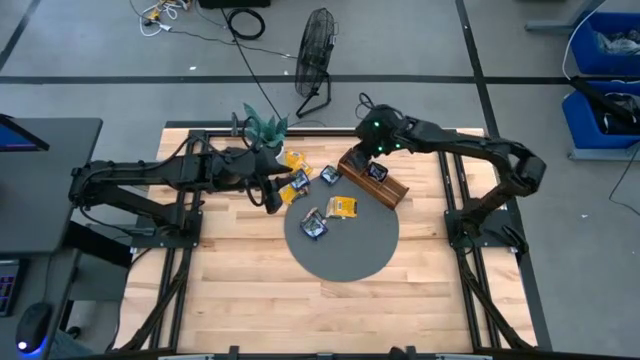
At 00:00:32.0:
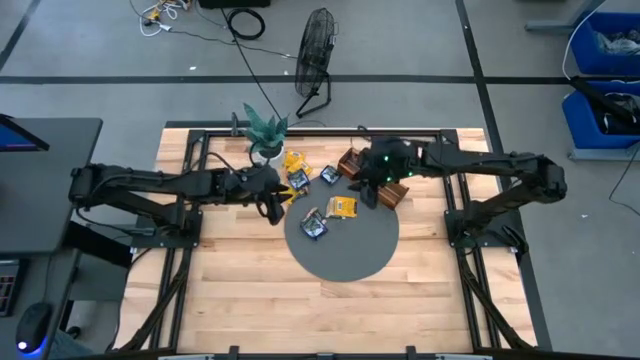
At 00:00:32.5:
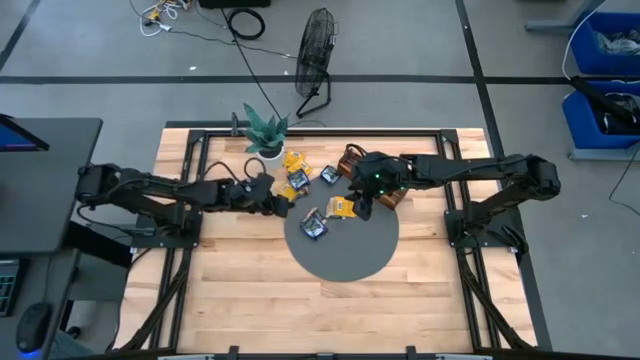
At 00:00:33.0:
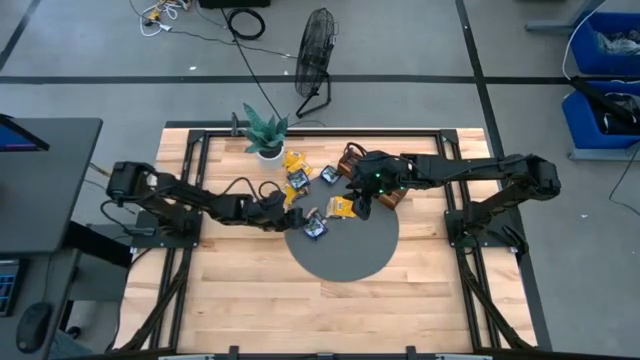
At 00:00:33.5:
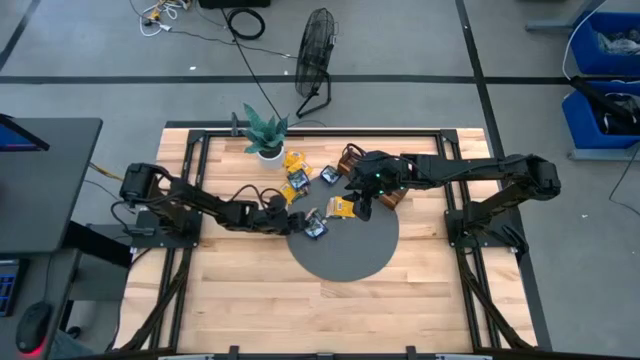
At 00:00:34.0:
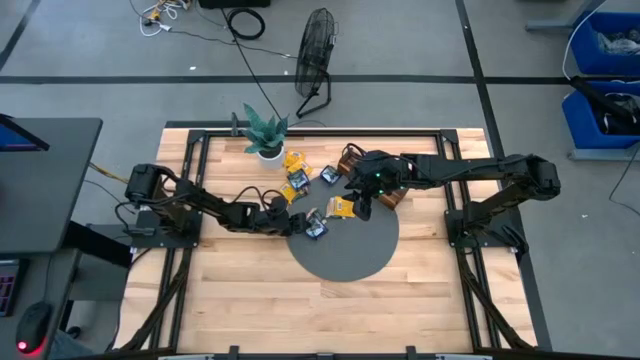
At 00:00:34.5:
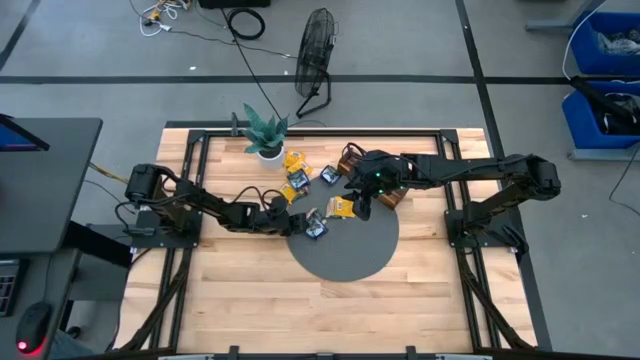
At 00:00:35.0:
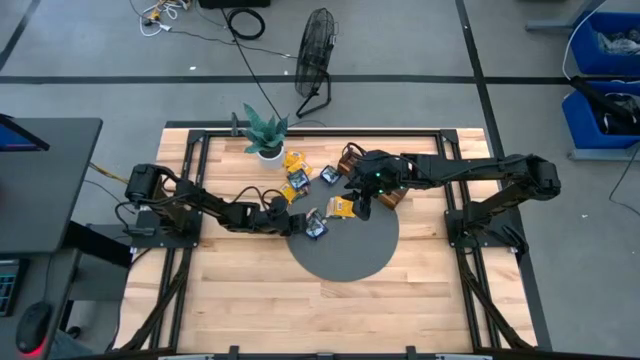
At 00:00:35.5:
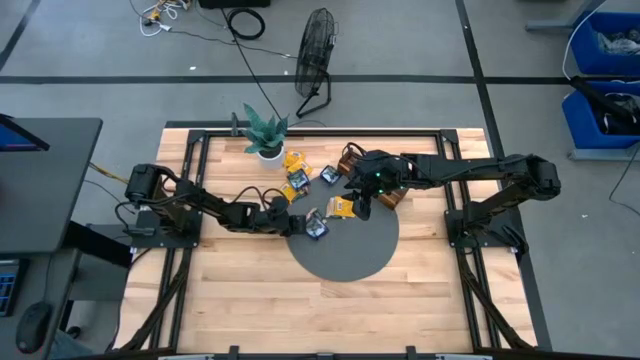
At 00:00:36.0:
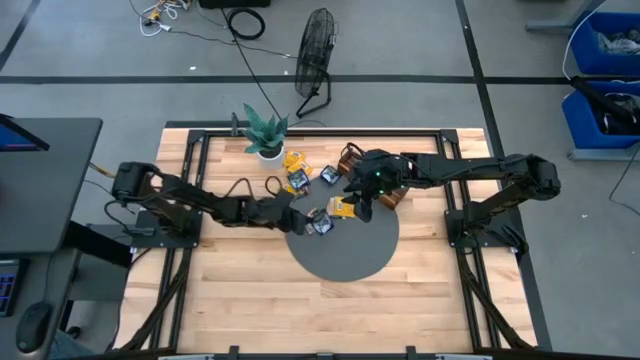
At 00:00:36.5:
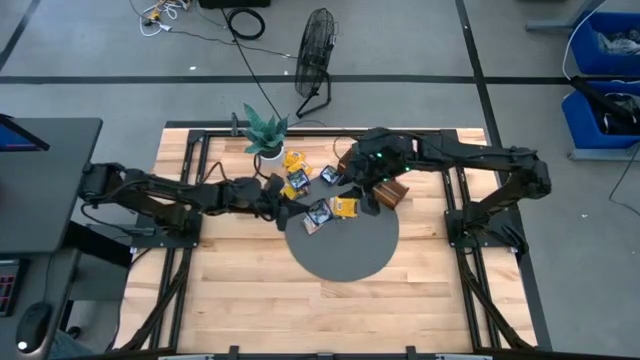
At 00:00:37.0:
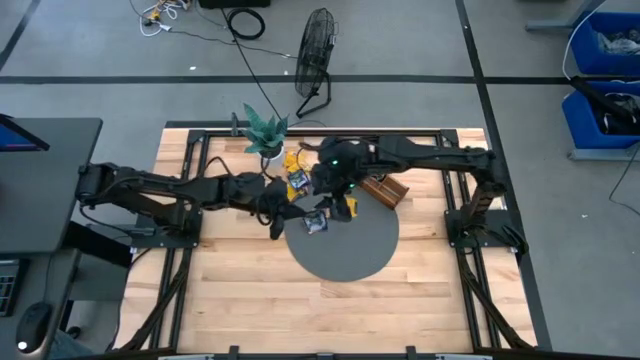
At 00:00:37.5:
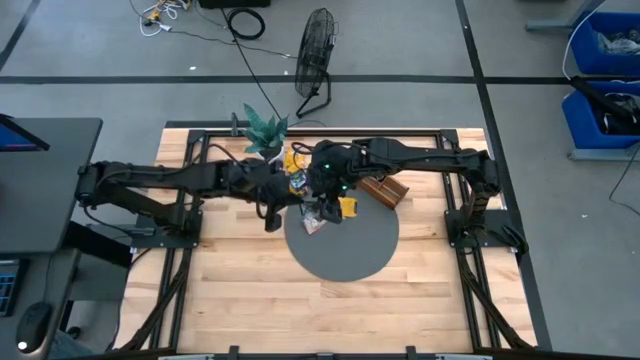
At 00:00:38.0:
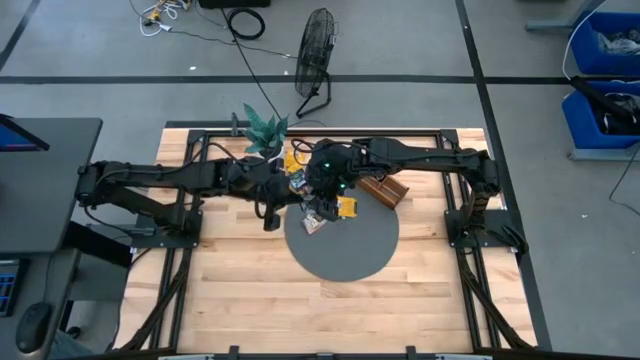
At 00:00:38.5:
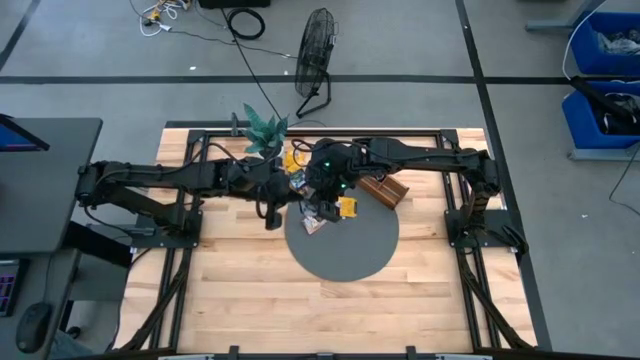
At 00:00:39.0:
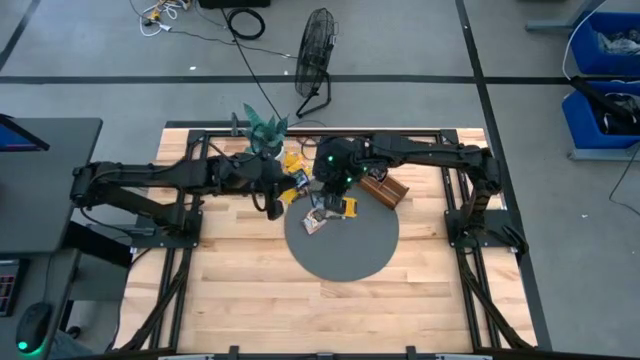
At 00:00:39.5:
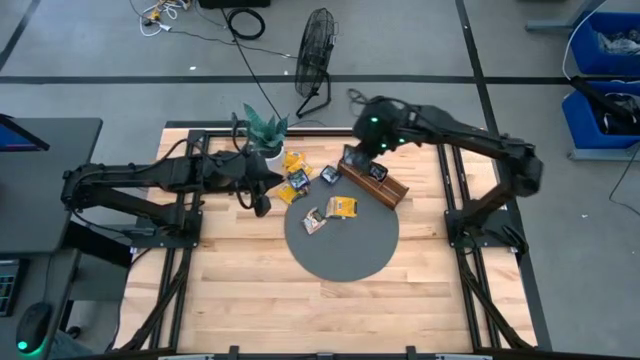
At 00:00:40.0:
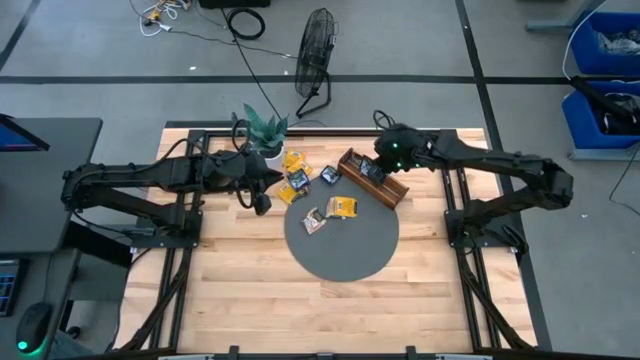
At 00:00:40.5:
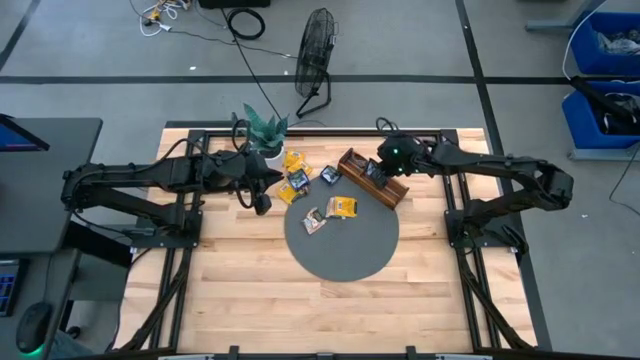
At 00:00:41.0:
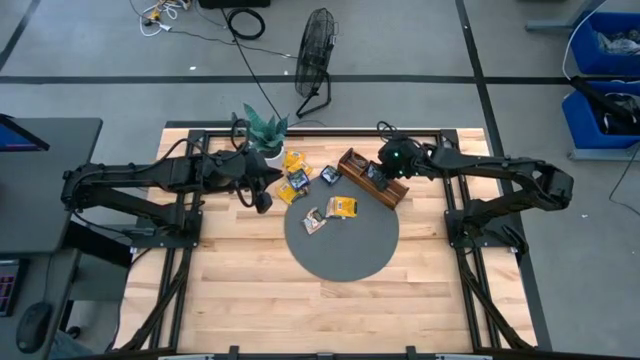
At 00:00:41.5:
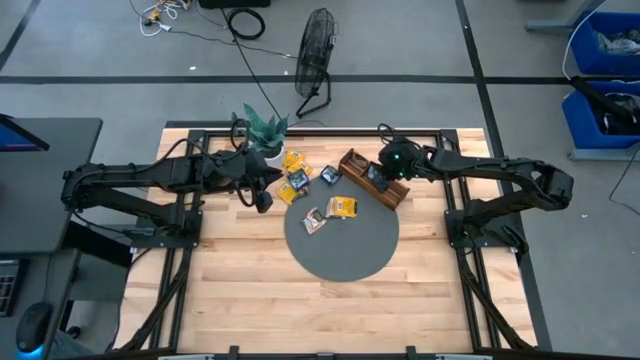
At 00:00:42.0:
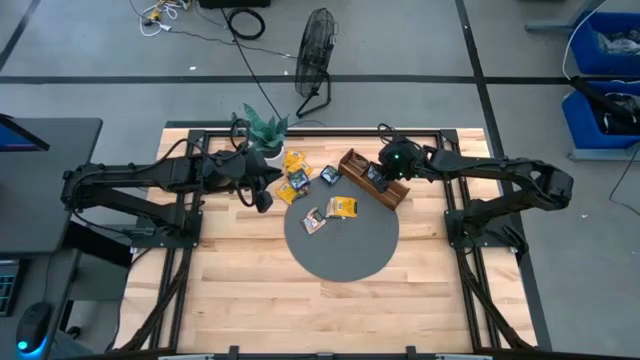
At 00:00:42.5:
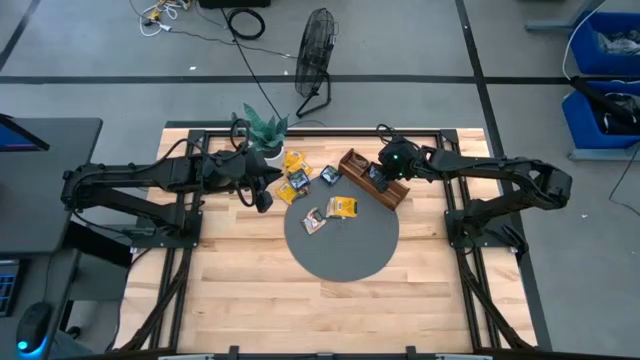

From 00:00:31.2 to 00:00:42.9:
Task: Pick & Place Tea
Put the black tea bag into the middle section of the wooden organizer

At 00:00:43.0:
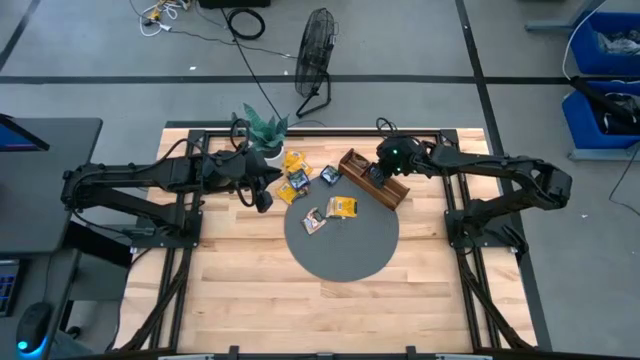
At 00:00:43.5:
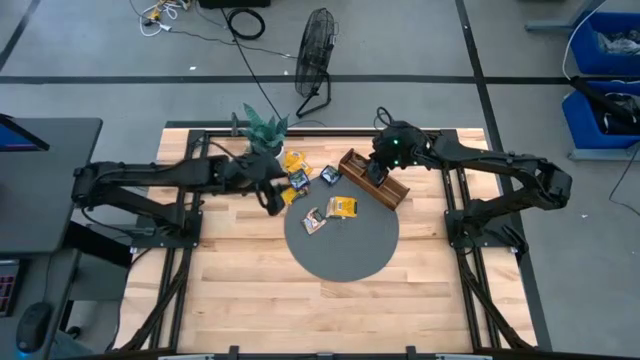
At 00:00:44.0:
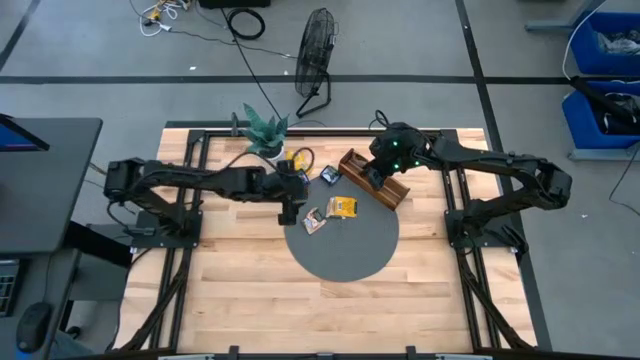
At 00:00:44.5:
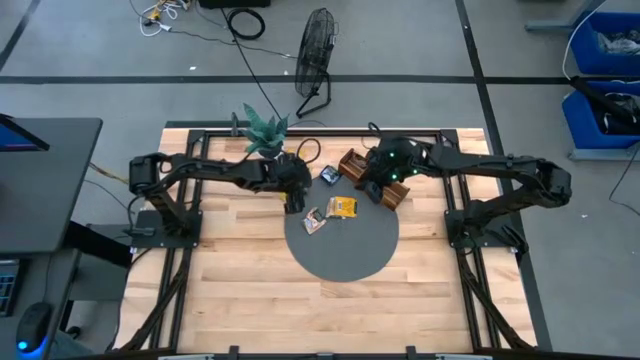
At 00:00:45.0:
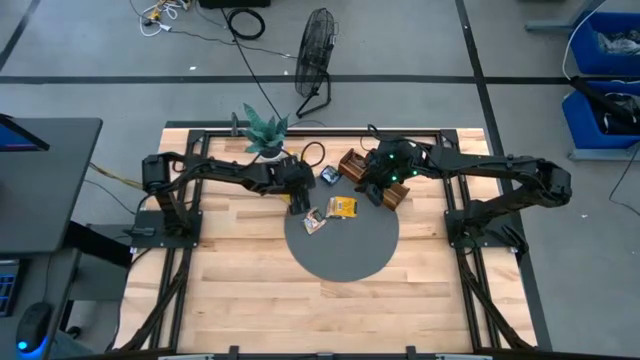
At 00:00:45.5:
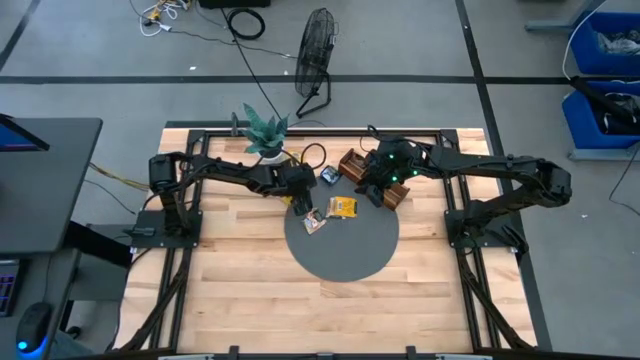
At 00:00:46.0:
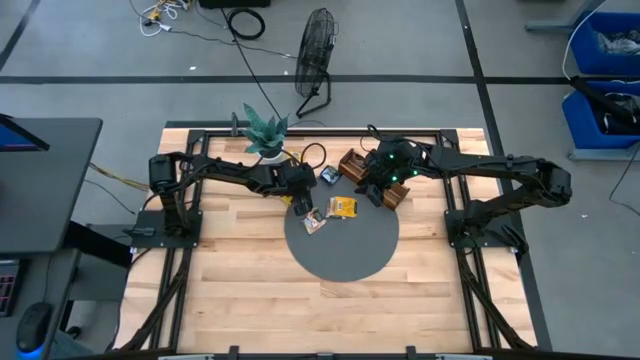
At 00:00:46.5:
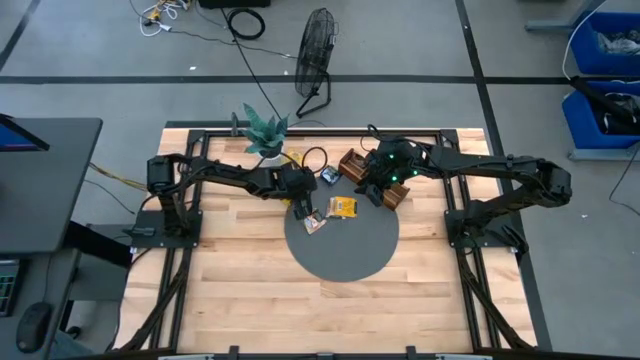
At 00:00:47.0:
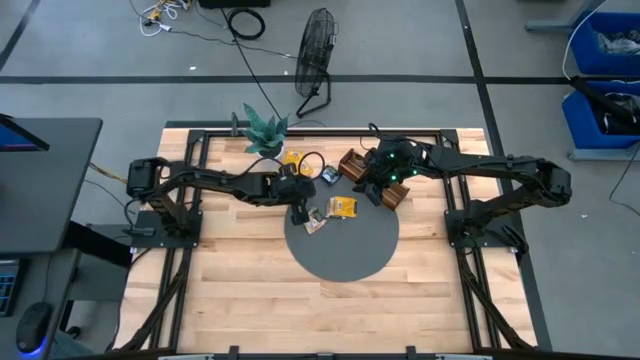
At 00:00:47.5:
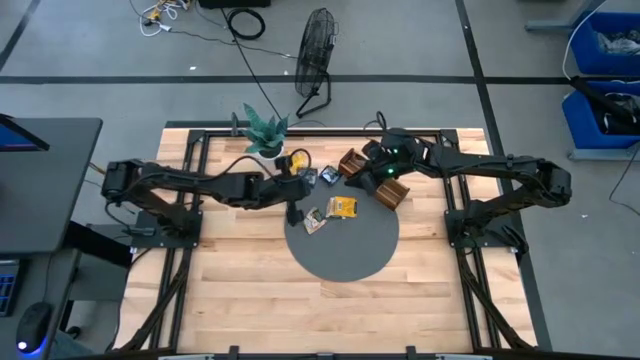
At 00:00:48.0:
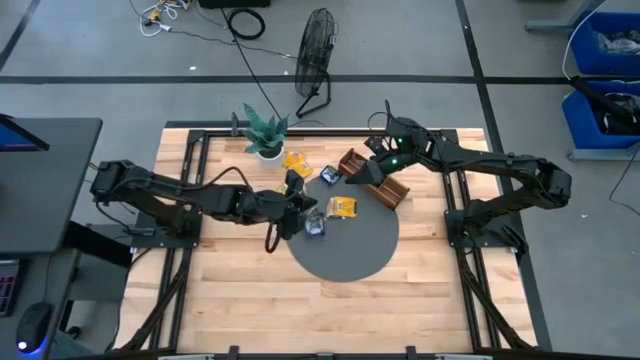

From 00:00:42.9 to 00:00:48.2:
Put the black tea bag into the middle section of the wooden organizer
